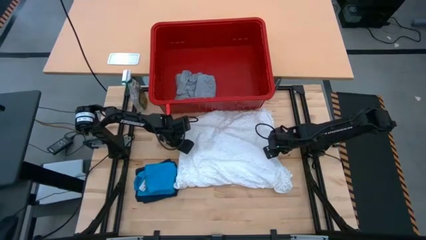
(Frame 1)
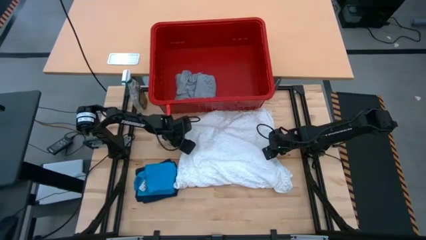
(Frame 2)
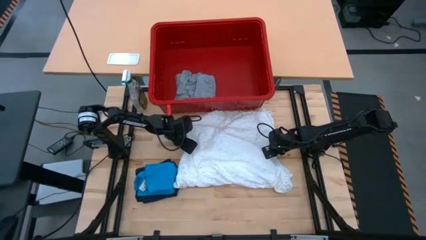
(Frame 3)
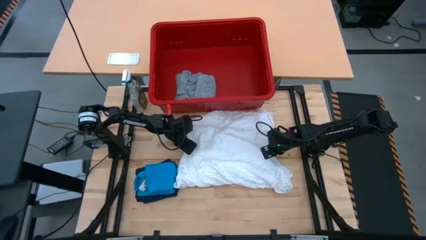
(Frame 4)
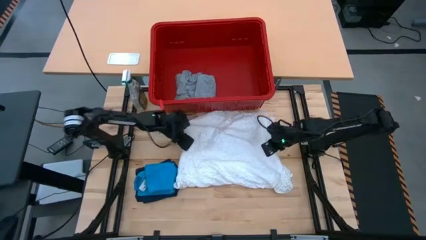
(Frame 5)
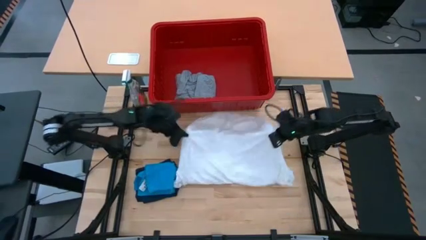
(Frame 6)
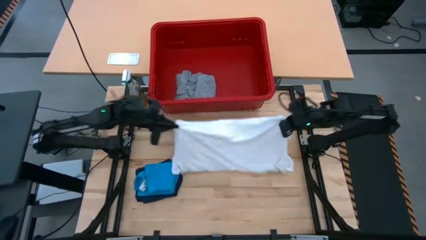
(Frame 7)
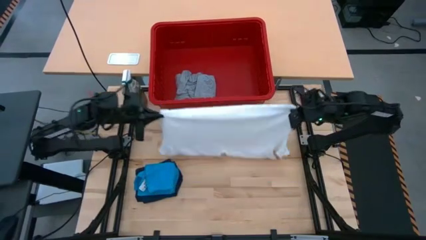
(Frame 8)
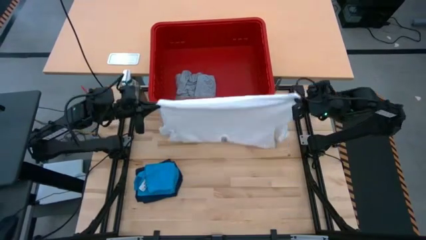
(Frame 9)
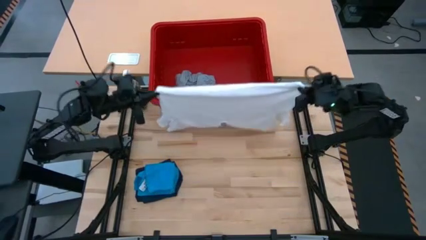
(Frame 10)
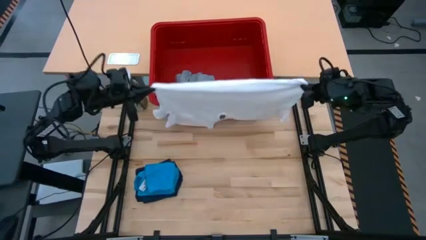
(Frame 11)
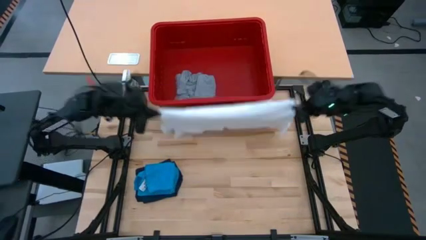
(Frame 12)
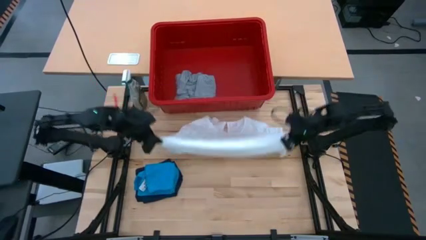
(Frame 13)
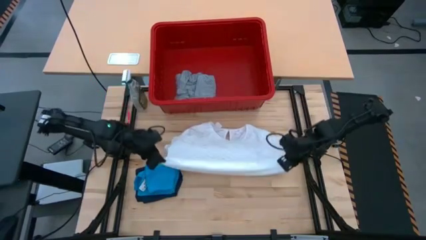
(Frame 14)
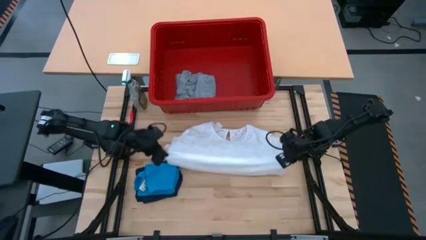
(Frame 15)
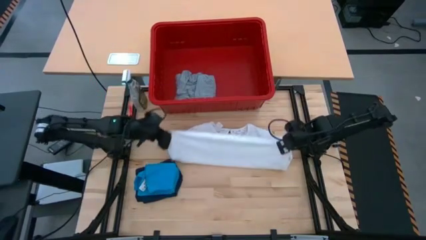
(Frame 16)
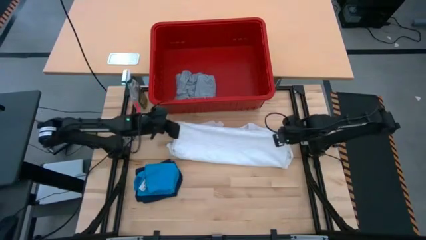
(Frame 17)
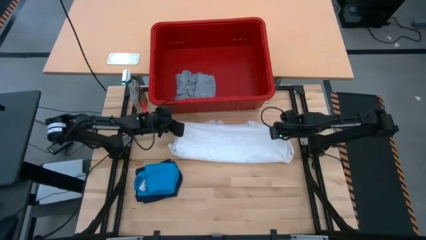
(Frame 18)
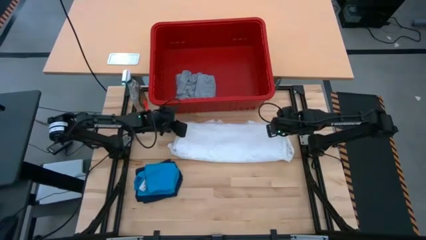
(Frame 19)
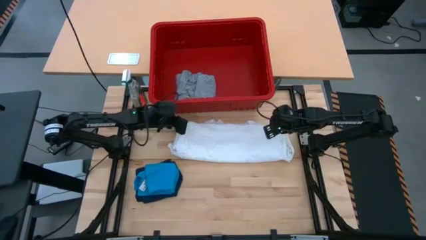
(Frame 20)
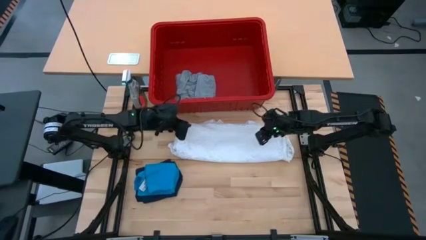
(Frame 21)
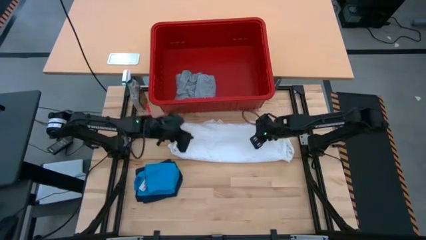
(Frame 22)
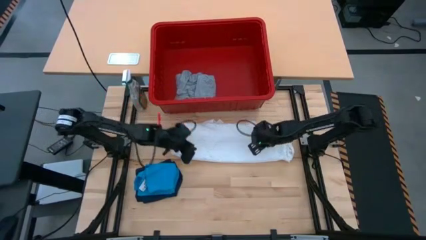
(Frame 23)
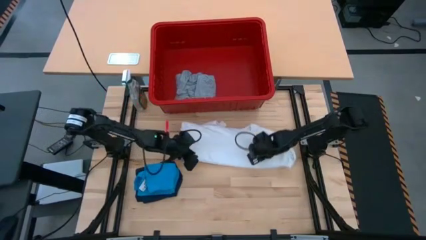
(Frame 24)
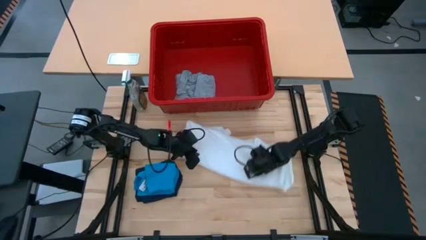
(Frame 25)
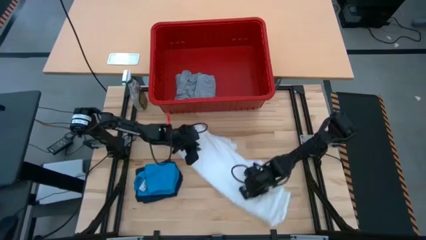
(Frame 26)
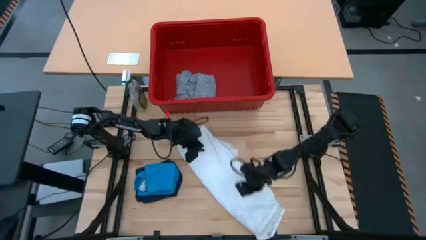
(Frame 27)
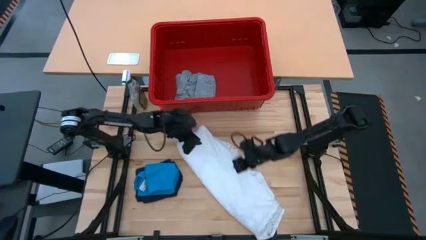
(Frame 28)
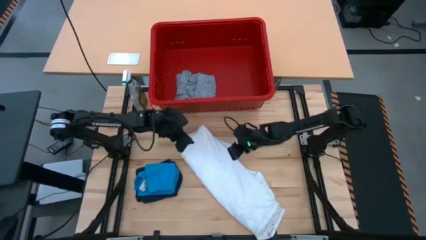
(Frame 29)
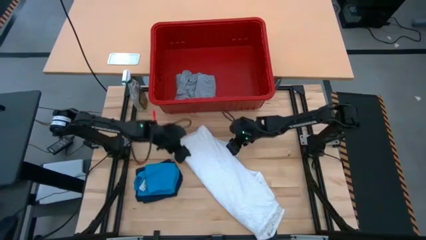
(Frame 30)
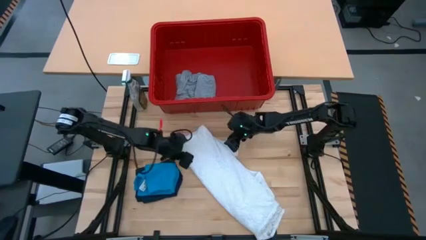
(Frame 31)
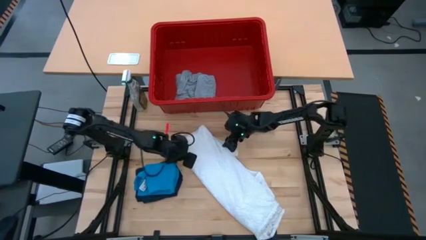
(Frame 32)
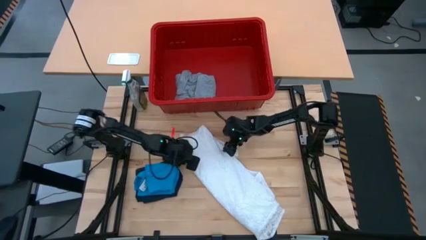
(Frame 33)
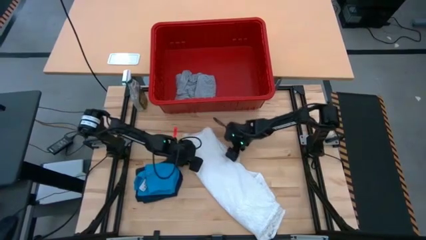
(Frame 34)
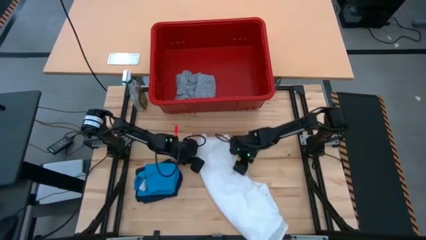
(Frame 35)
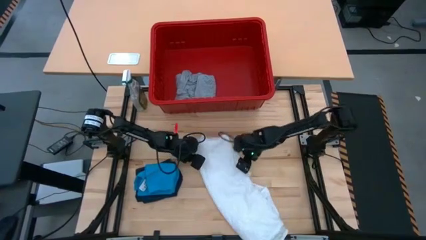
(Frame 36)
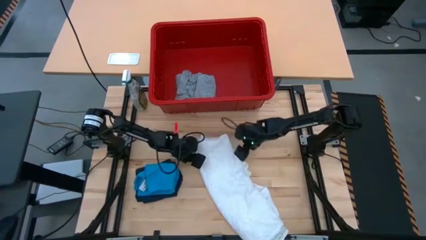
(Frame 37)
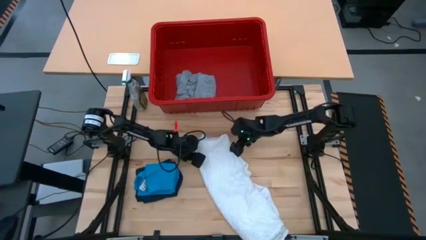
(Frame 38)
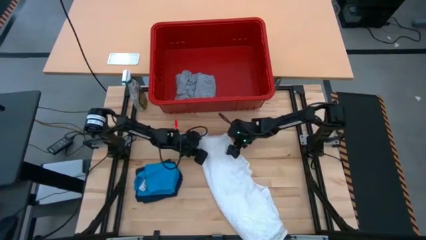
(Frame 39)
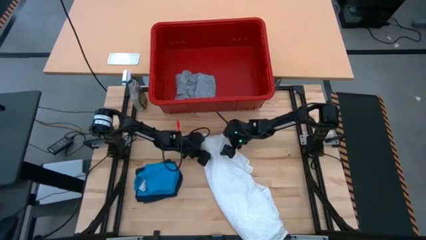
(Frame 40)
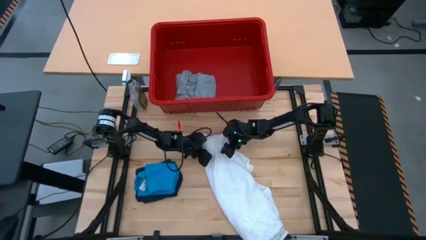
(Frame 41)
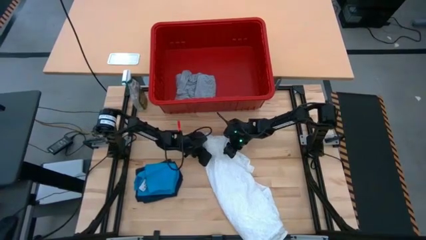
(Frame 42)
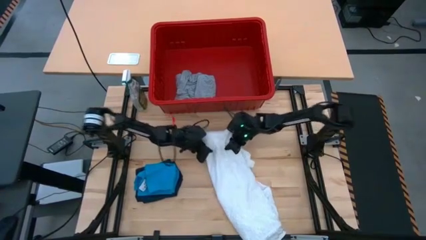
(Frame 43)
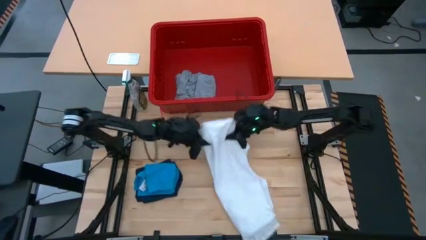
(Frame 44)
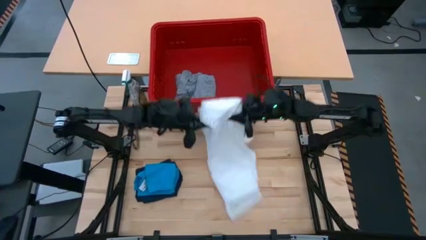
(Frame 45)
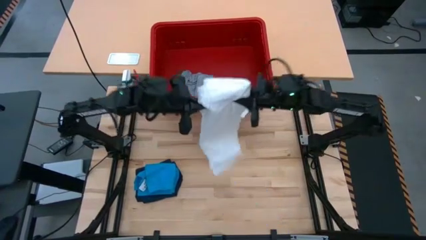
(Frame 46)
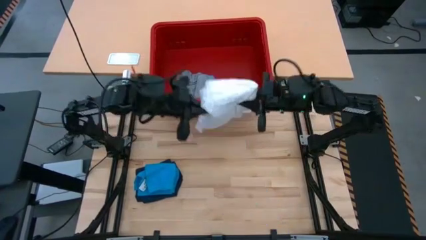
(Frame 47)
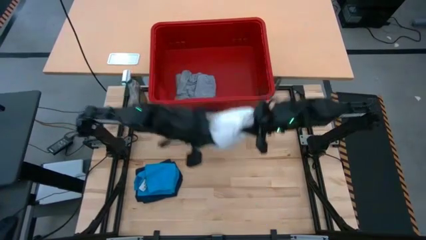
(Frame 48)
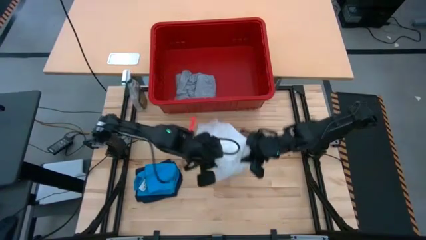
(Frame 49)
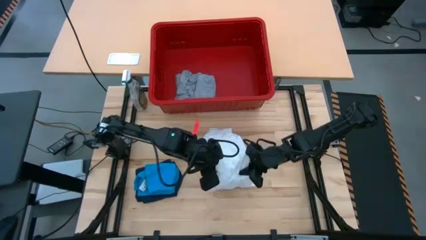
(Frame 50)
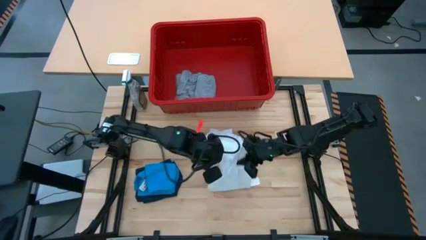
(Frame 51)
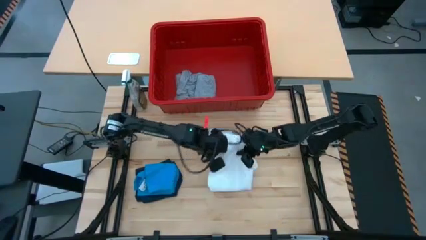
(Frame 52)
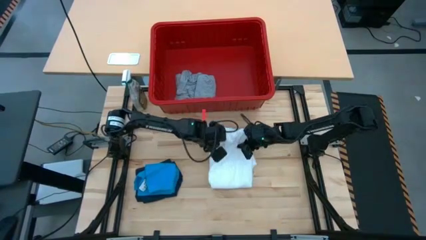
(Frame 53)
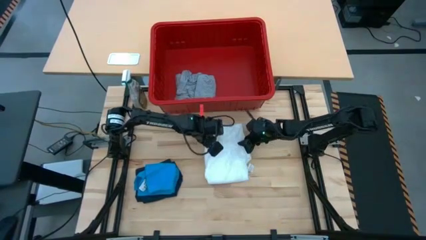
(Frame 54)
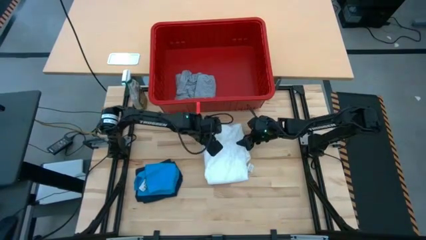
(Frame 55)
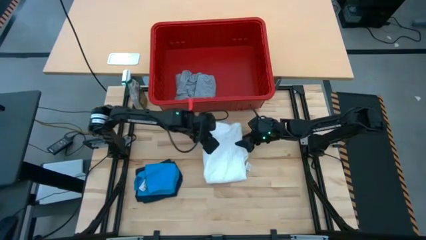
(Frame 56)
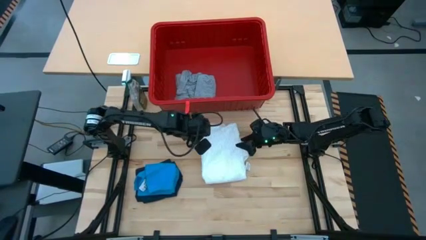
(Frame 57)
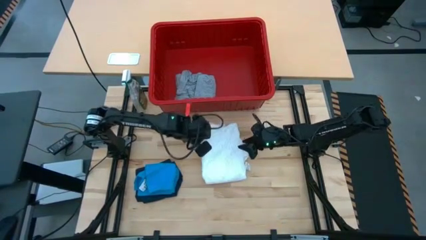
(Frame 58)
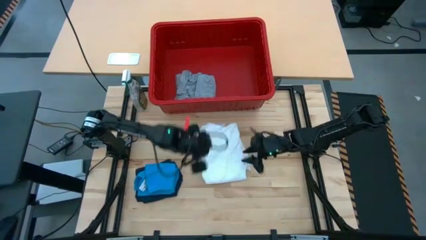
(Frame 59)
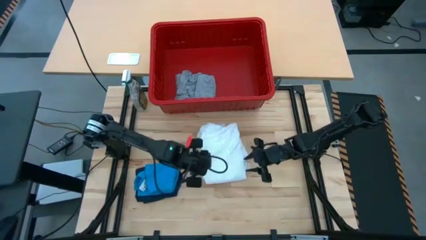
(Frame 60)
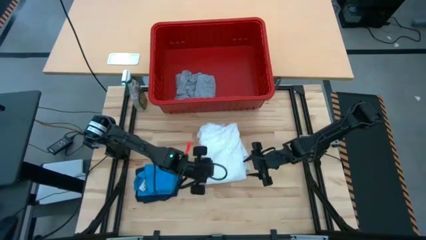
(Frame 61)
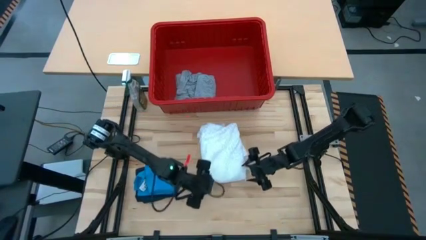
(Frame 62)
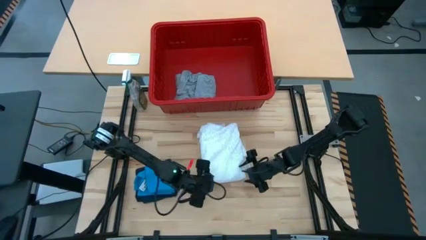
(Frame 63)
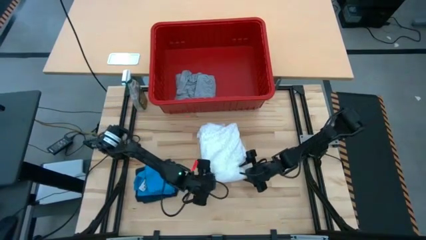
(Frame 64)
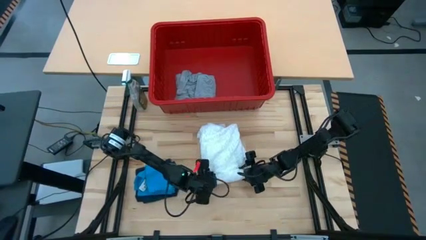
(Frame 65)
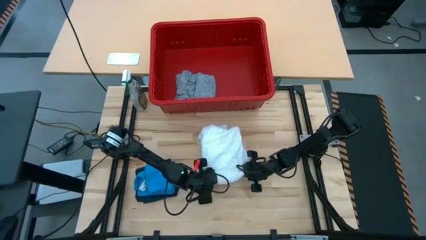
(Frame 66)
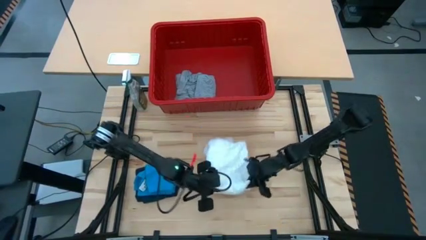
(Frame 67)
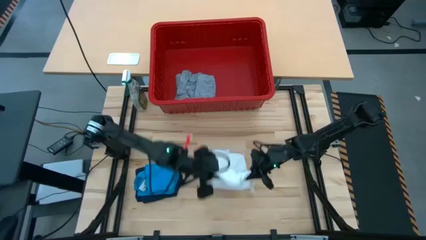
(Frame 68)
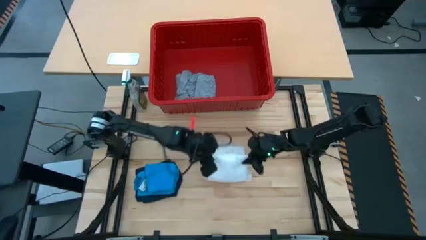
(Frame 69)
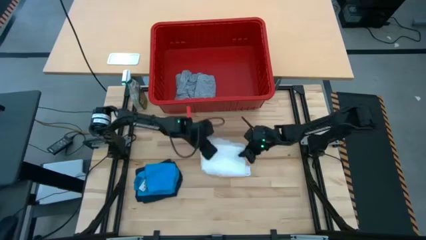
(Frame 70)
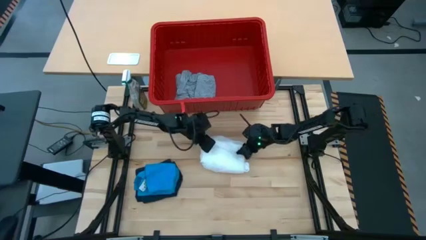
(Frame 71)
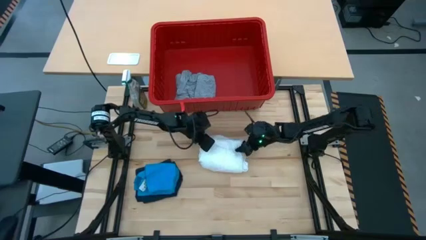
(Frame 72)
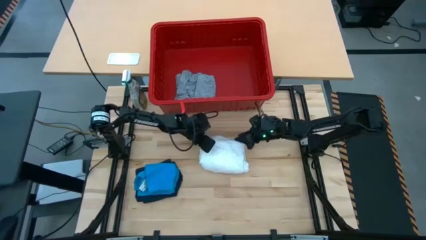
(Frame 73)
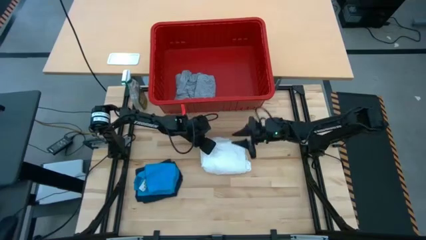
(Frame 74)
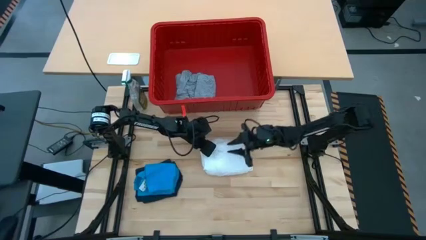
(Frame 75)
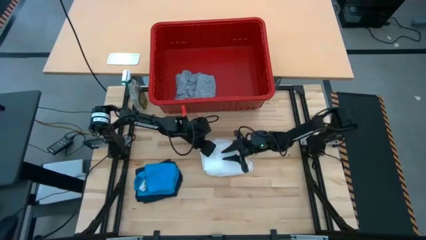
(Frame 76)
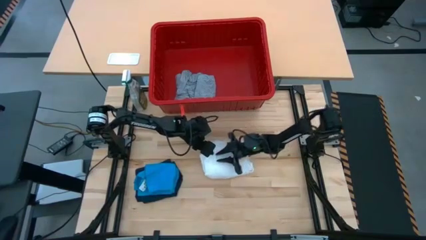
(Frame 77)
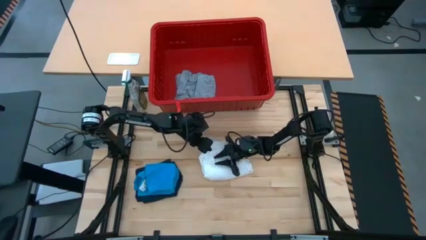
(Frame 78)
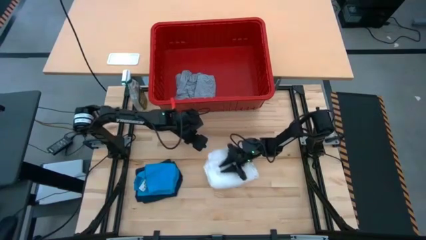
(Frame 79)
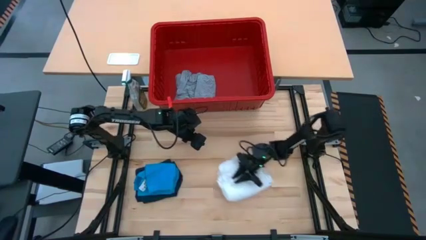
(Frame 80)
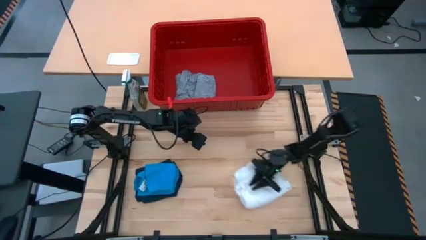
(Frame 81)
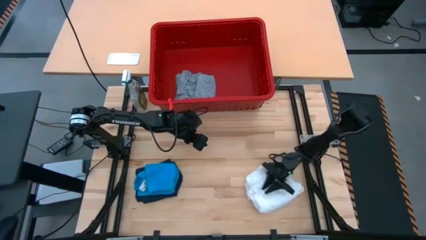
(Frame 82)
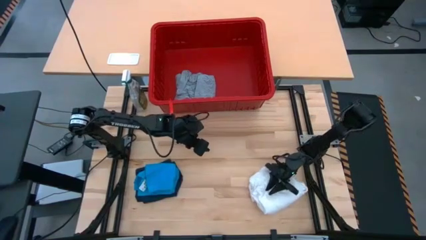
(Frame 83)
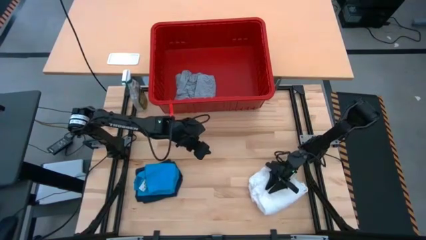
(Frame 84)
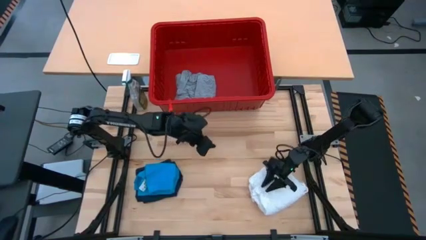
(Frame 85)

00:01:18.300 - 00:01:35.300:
Task: Fold laundry
Fold the white shirt
